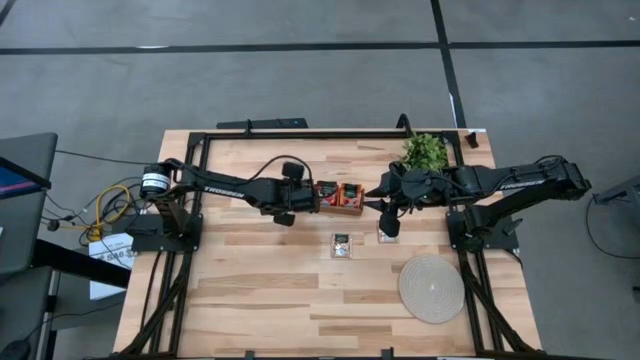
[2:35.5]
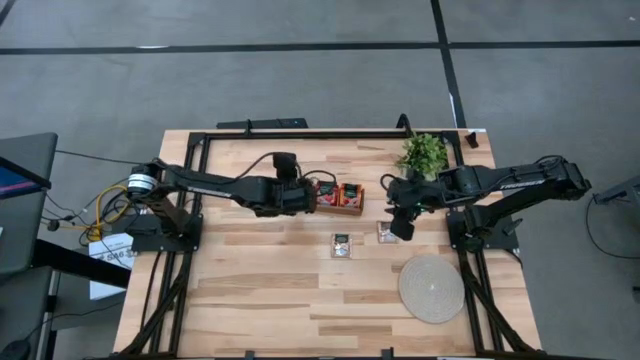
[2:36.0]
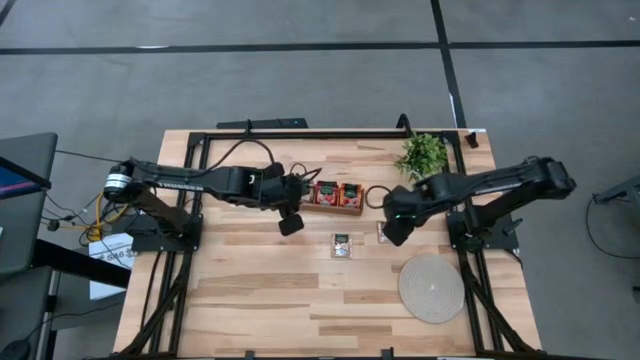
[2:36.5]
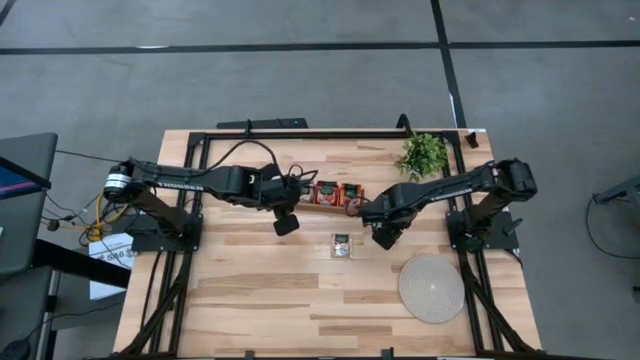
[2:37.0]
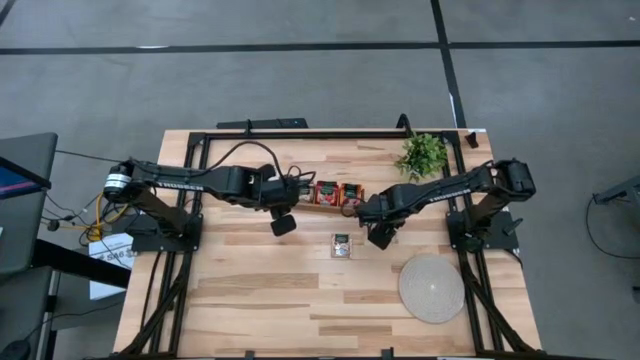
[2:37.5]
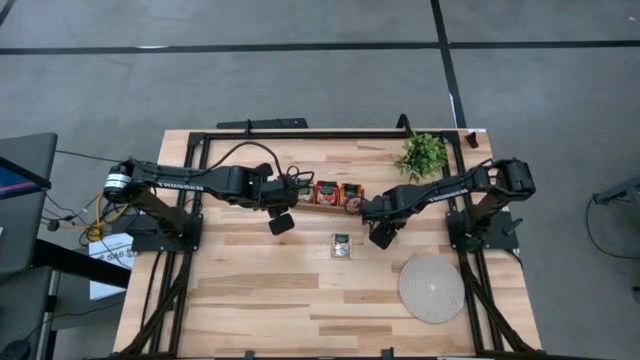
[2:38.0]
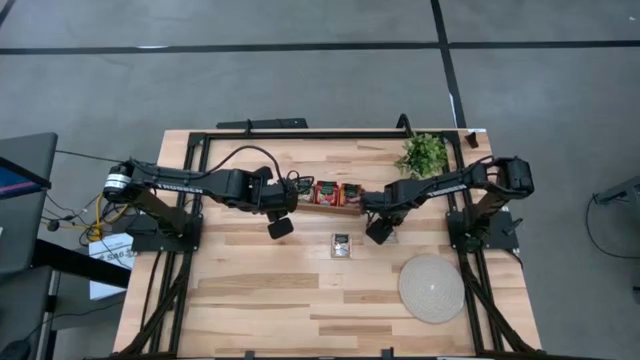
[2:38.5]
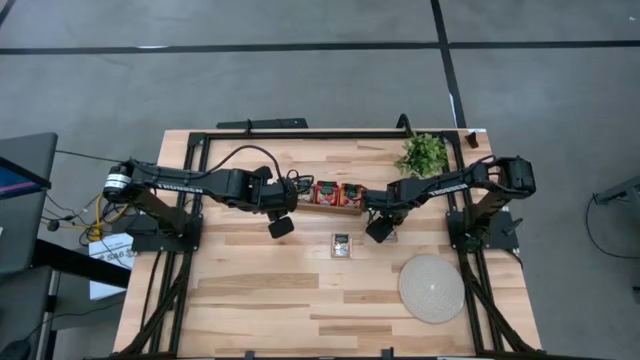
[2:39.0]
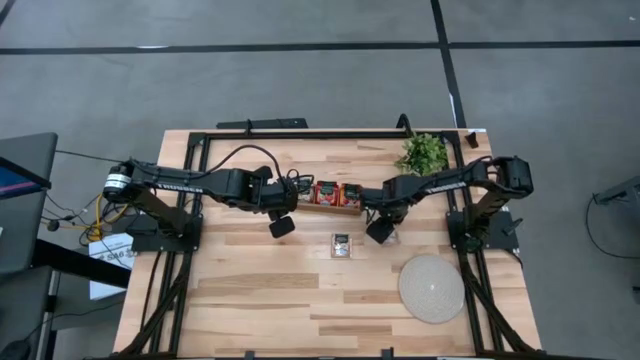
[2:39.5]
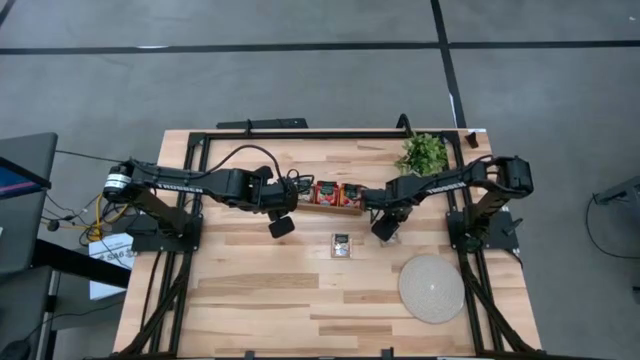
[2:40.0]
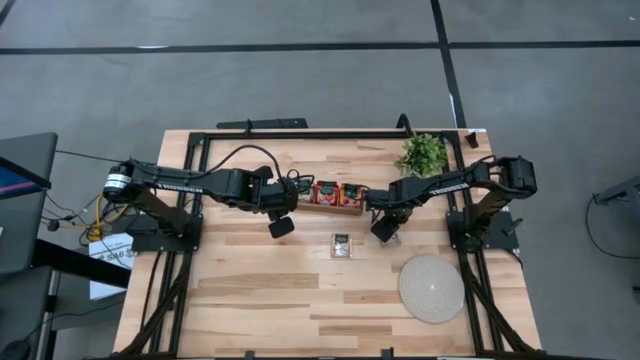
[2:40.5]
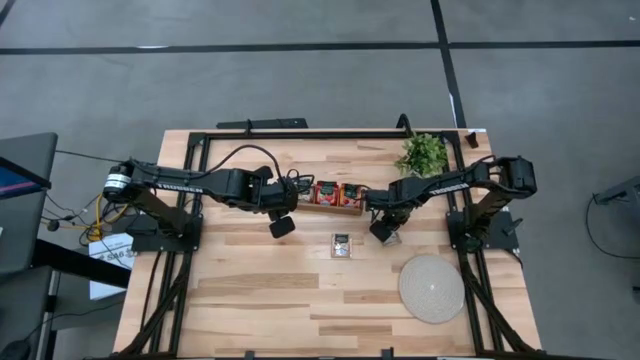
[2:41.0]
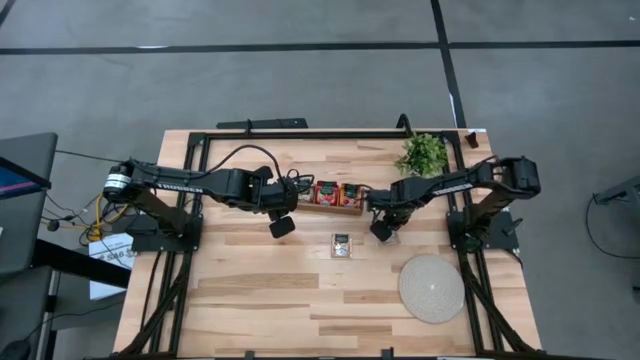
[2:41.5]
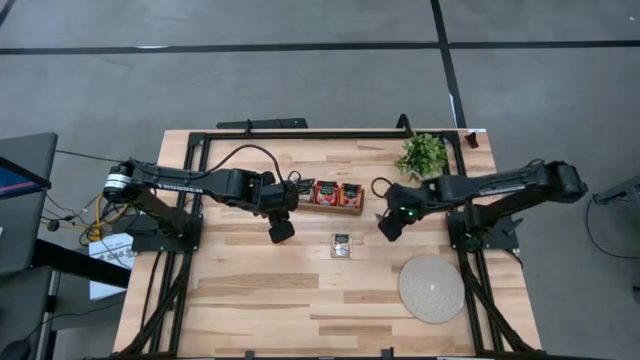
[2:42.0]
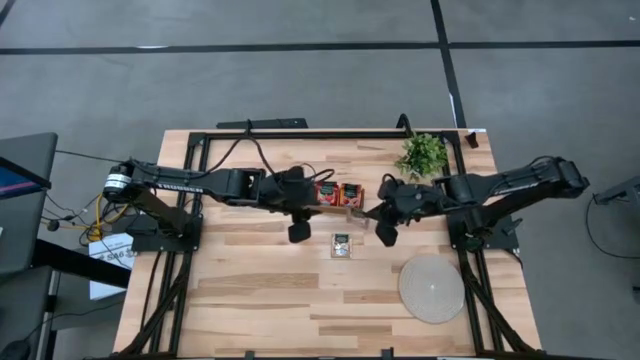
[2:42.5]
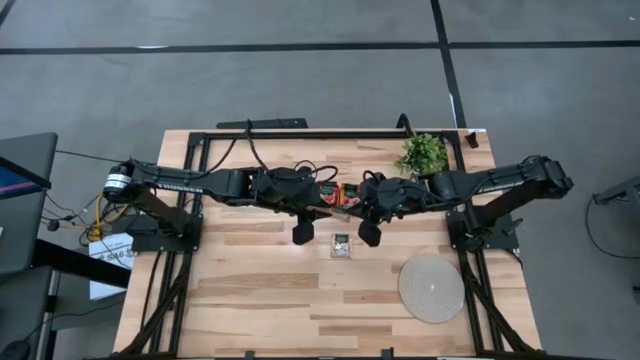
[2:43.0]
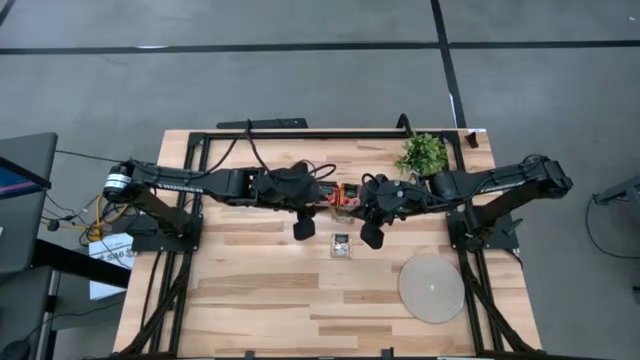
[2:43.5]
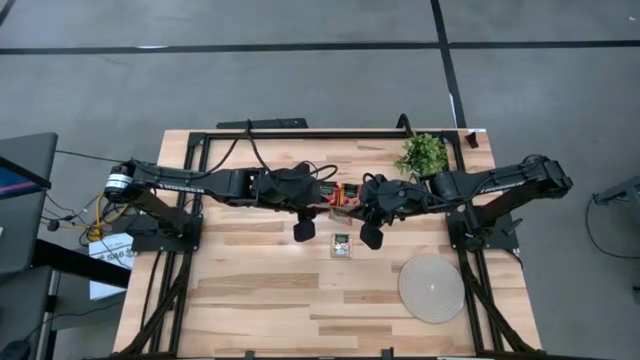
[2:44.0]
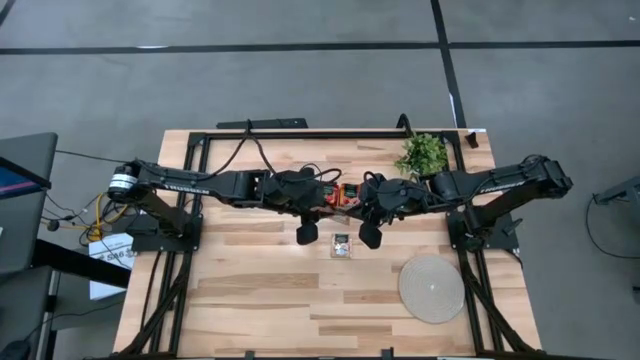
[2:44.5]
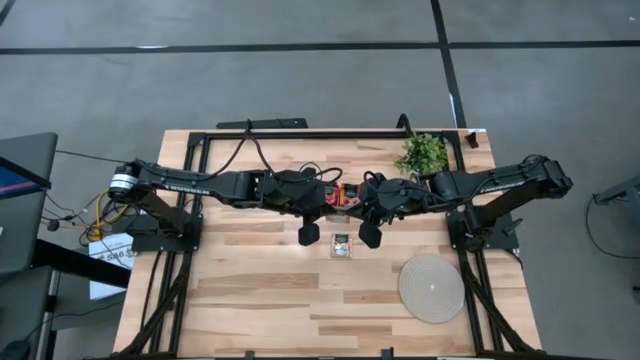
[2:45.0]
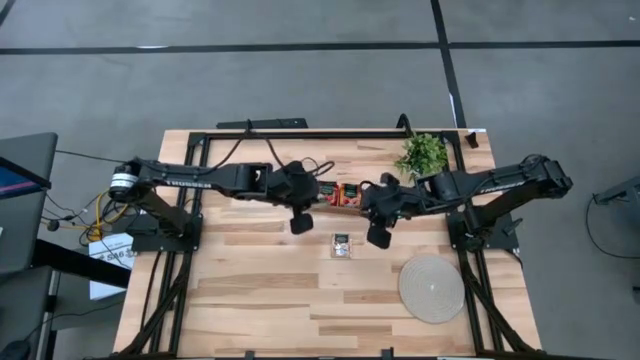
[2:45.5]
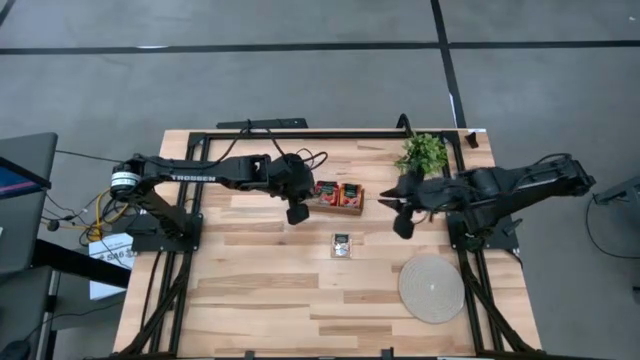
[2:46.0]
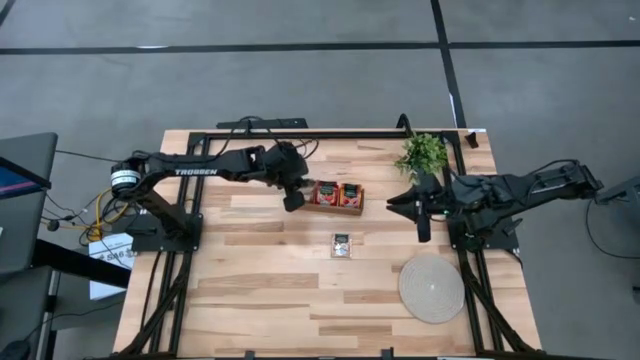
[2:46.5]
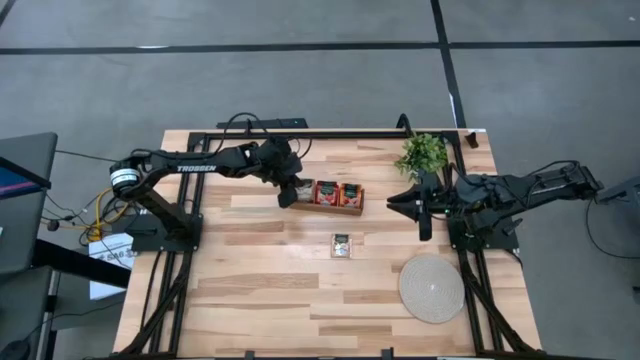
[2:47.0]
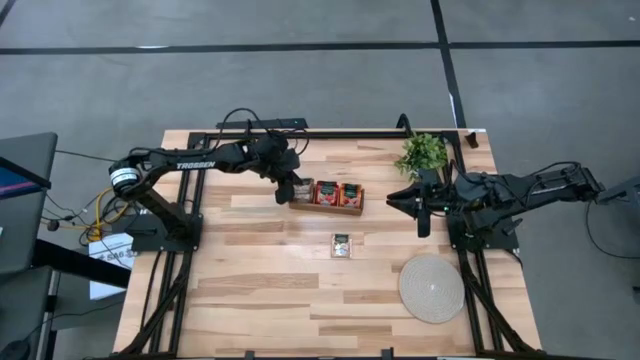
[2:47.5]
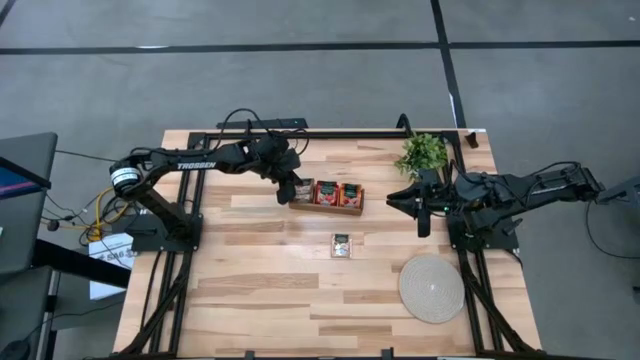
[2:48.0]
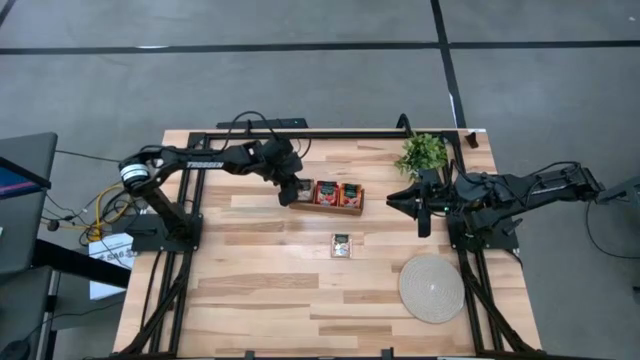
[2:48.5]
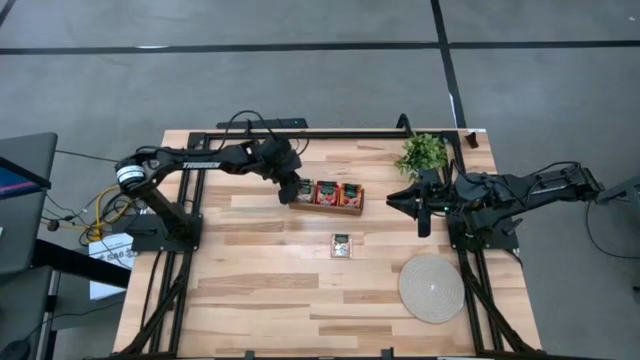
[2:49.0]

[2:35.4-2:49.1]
Task: Pick & Place Tea
Put the brown tea bag into the left section of the wooden organizer

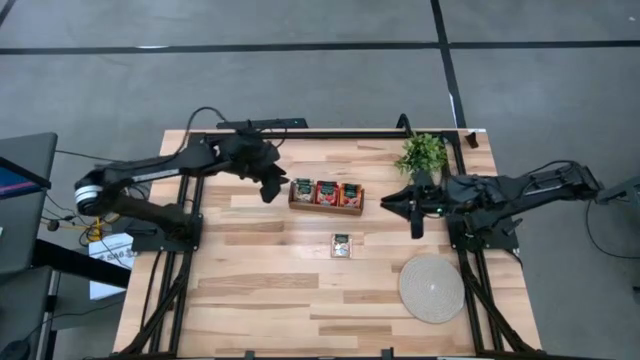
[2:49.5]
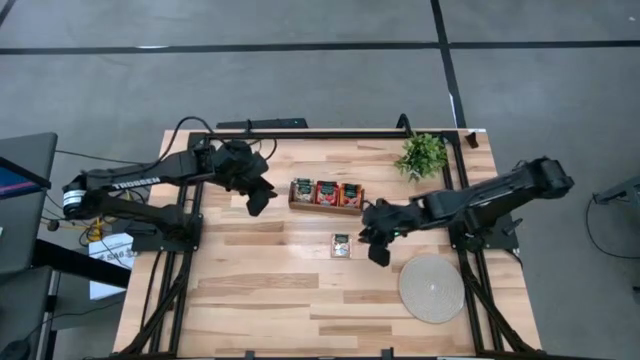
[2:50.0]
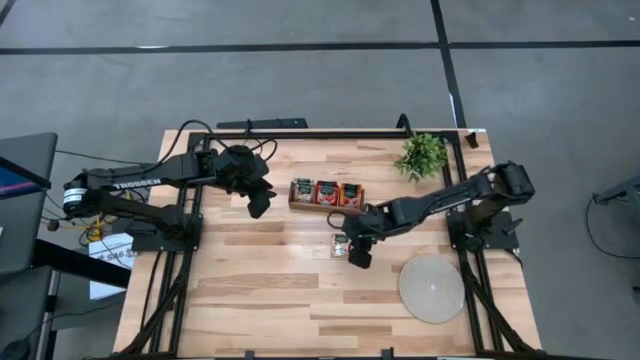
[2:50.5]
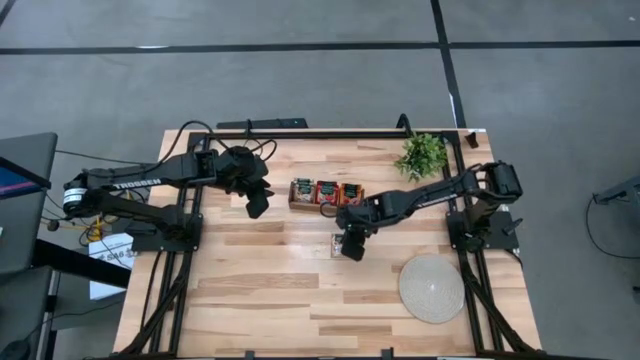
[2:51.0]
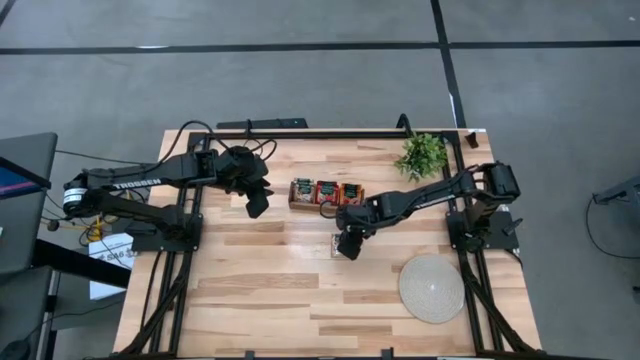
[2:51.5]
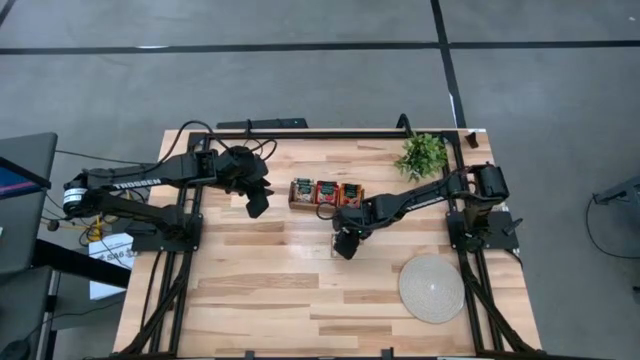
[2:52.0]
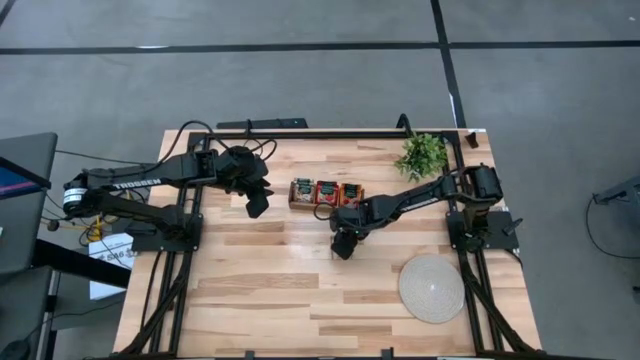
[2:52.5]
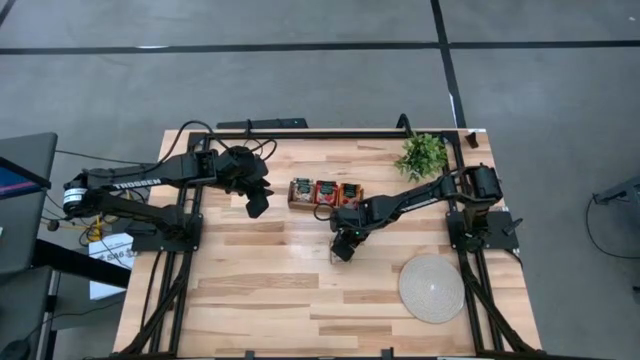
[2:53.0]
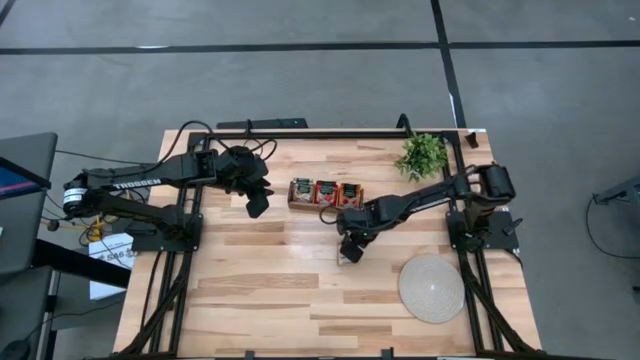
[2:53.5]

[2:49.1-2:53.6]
Put the brown tea bag into the left section of the wooden organizer
